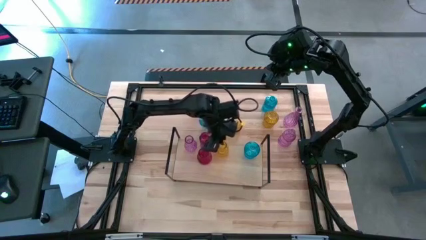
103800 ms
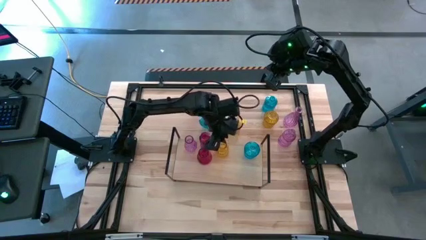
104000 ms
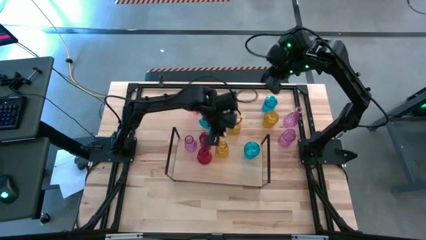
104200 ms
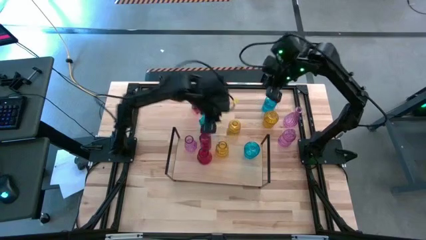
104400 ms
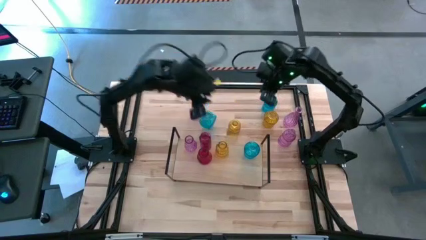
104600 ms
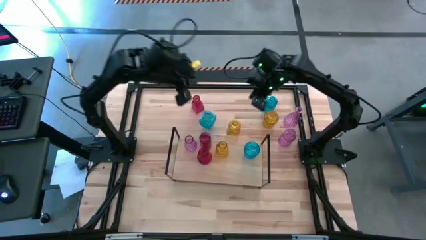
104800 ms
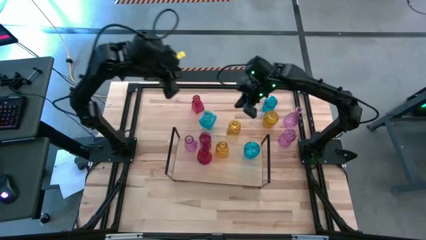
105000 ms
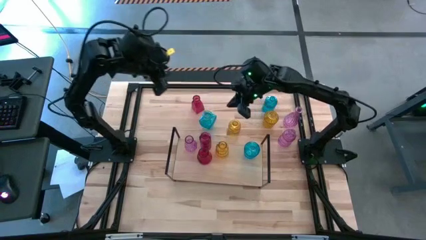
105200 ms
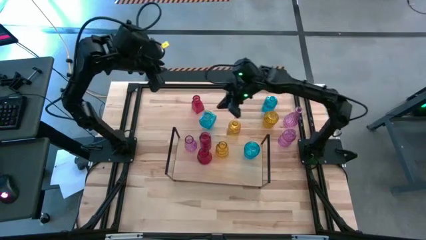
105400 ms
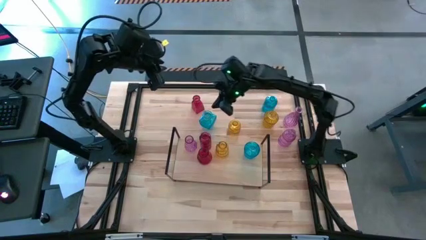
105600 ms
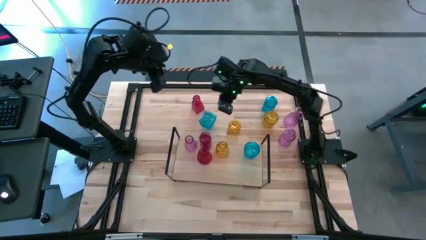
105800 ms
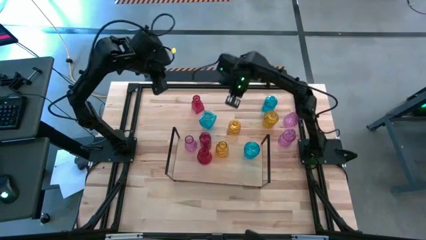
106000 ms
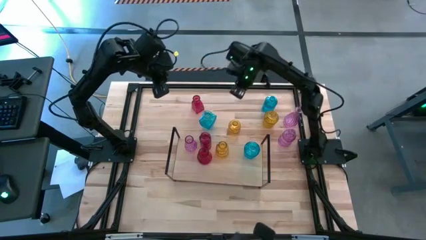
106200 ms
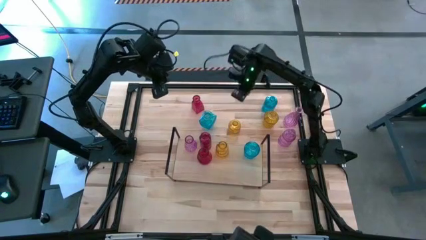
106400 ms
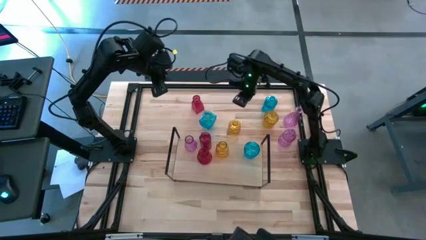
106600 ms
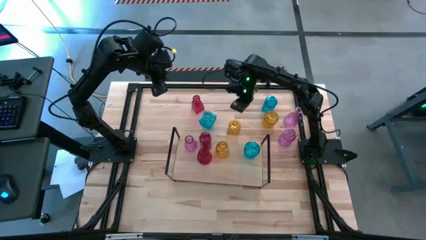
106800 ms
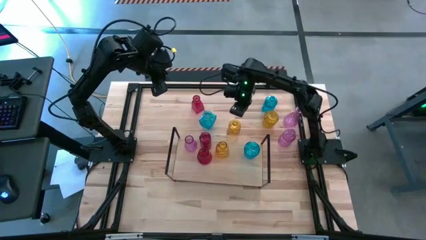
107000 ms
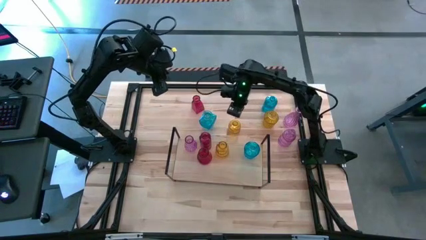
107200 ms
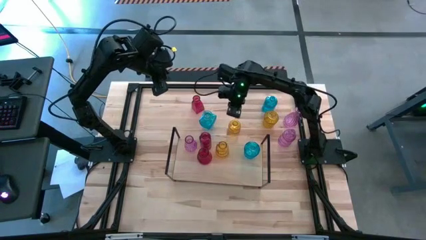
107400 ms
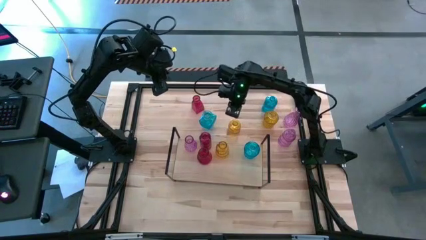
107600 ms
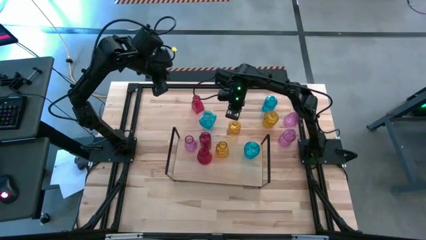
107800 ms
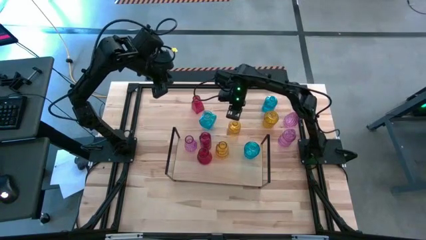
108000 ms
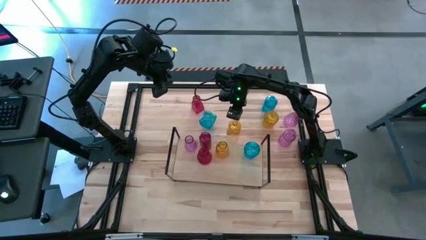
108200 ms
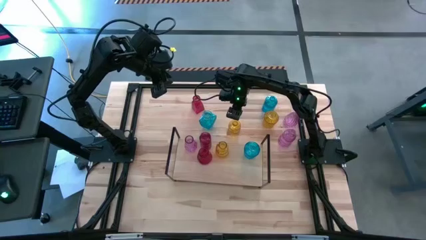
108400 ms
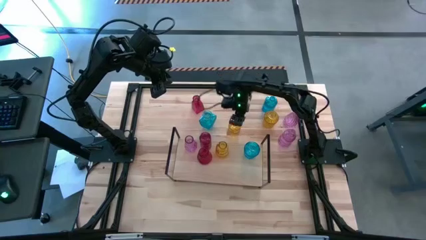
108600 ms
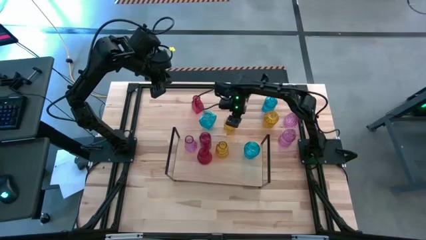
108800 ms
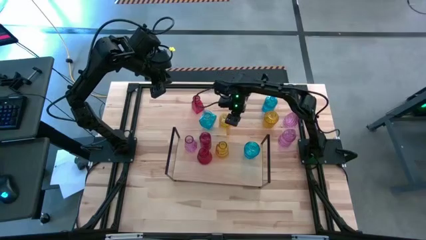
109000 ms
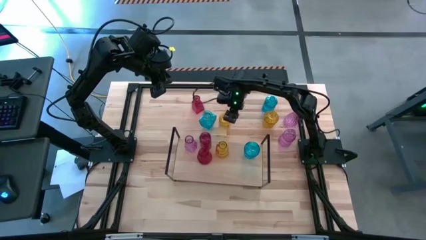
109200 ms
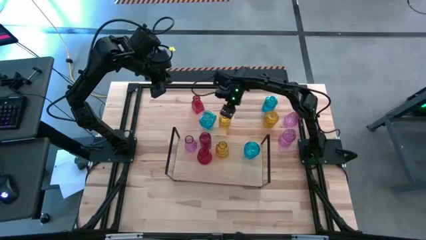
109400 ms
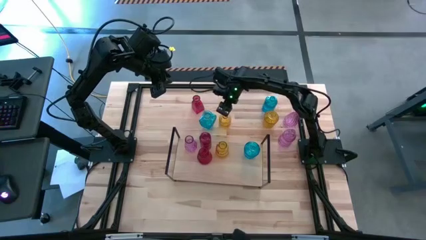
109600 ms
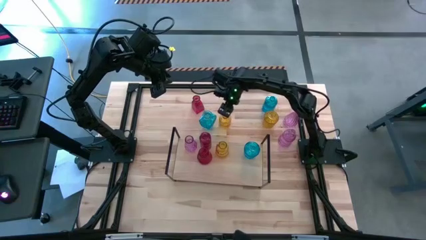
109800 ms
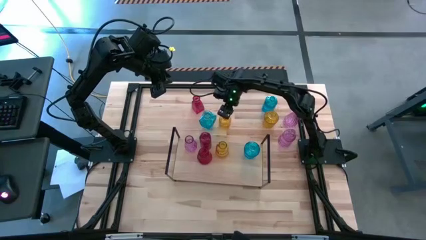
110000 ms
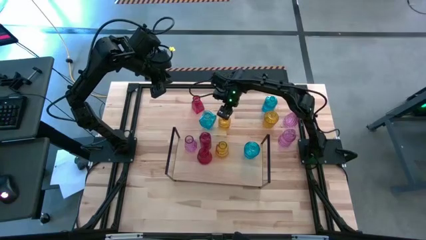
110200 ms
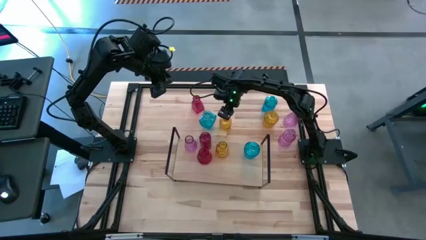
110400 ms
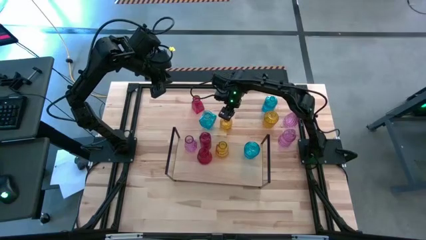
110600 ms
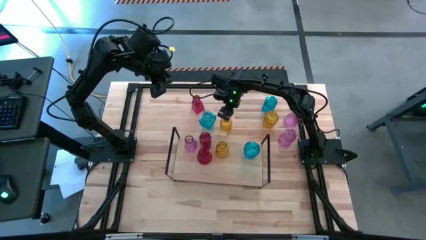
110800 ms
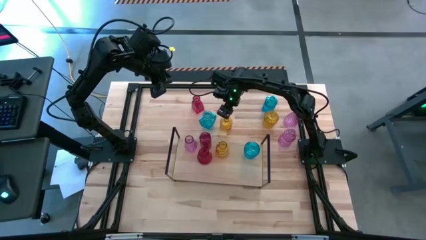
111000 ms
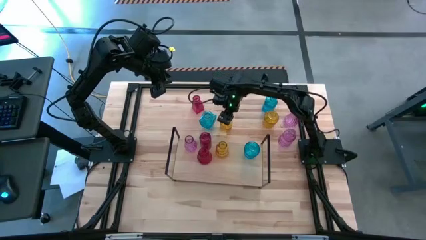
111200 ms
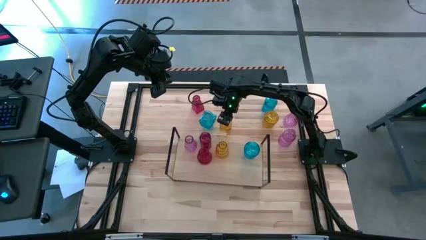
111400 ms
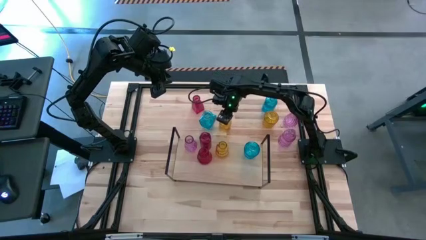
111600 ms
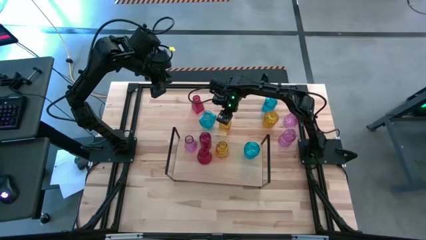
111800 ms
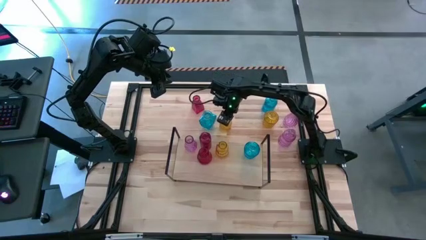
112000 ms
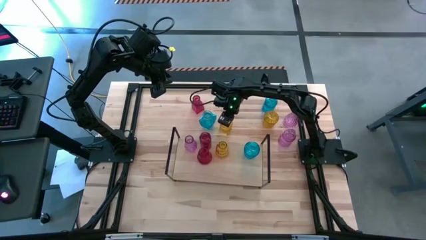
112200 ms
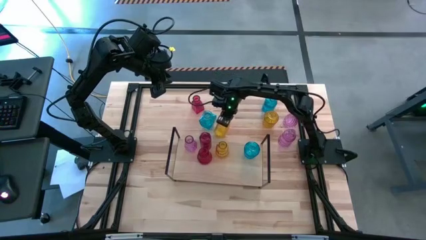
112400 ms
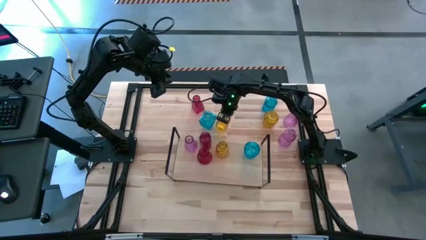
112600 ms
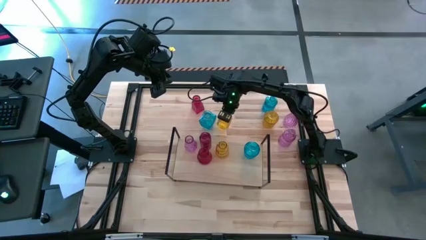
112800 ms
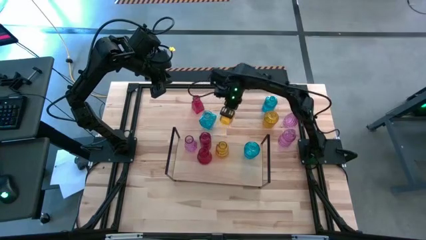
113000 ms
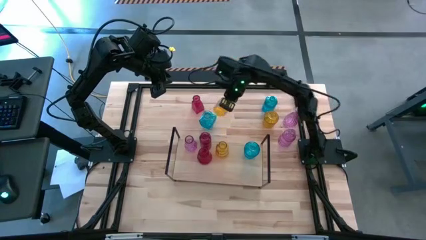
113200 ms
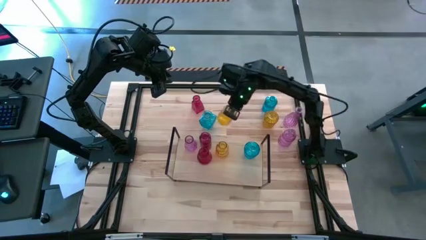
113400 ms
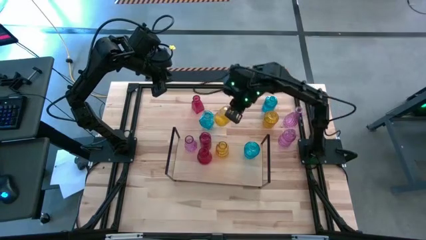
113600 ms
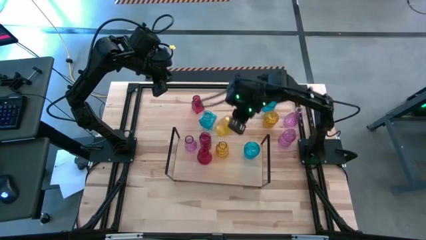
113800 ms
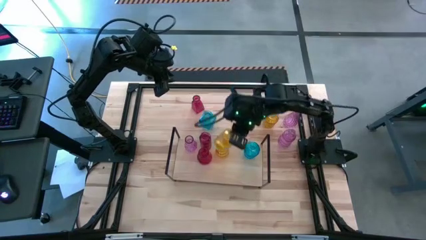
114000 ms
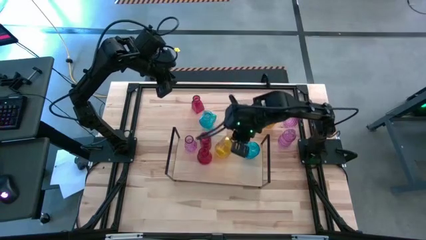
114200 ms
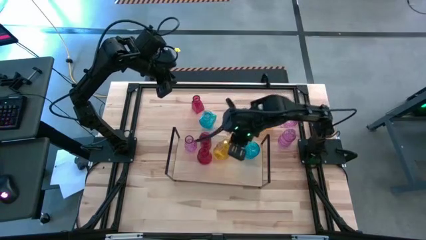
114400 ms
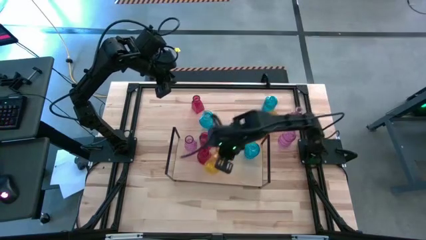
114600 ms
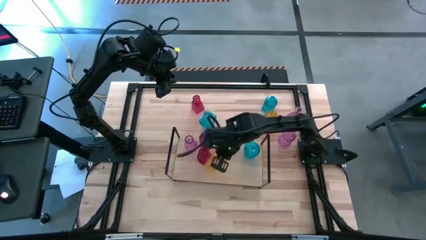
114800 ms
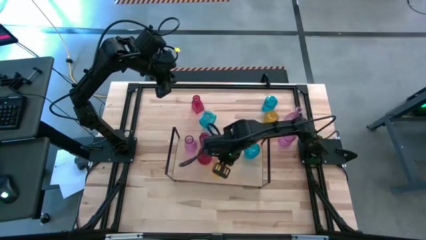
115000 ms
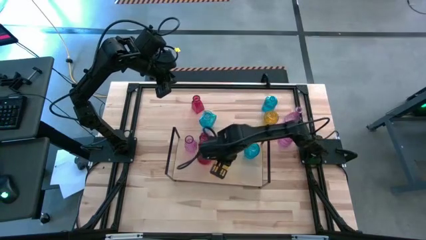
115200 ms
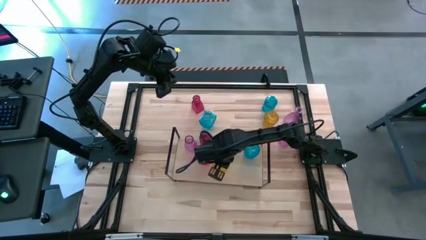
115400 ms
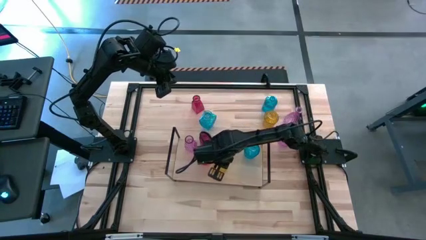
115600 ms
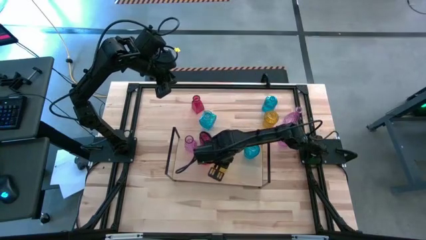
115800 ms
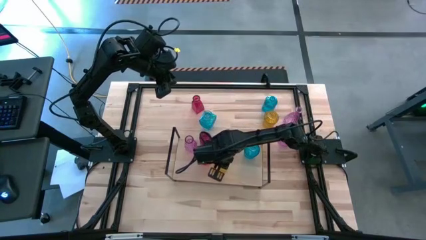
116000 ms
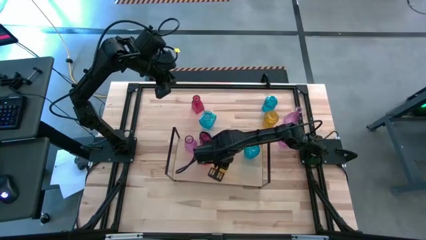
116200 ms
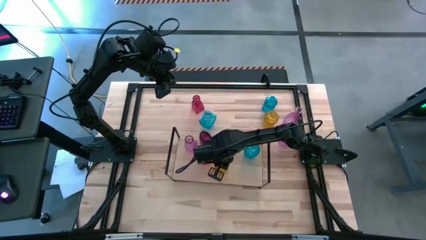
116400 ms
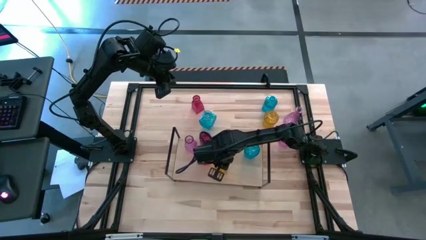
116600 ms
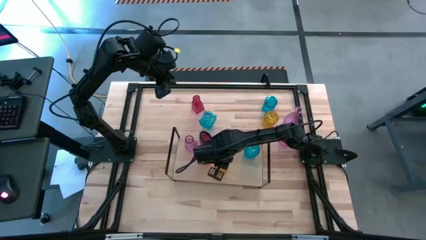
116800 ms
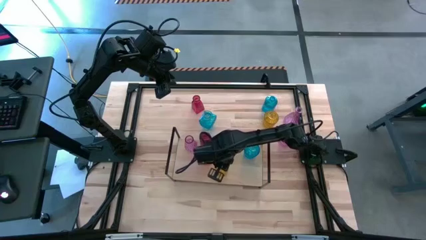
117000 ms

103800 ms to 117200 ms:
Task: sort vases onto shelf
Put the bottom yellow vase on the shelf aligned with the other yellow vase

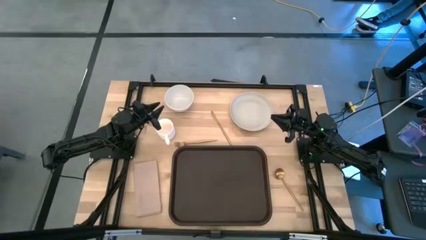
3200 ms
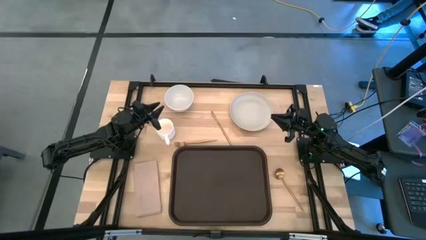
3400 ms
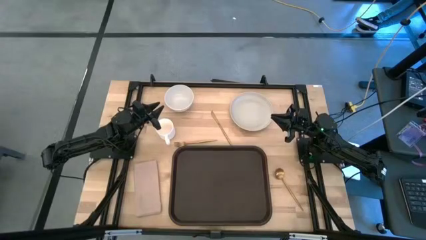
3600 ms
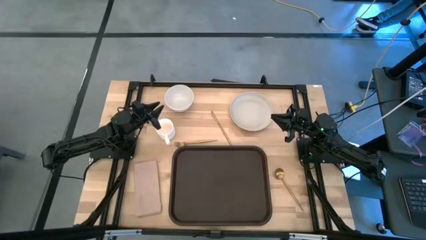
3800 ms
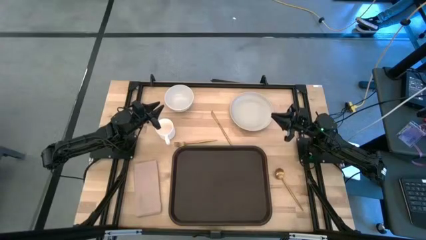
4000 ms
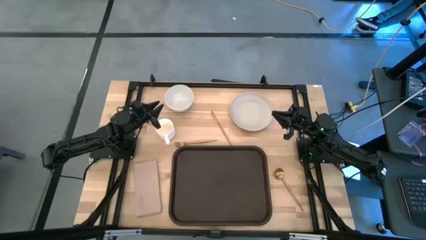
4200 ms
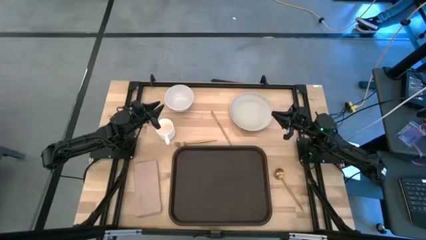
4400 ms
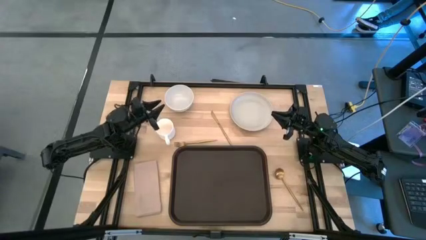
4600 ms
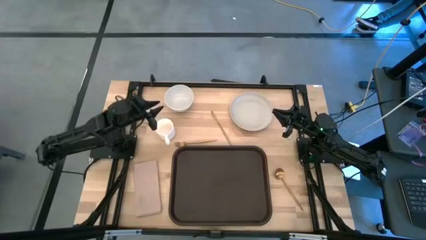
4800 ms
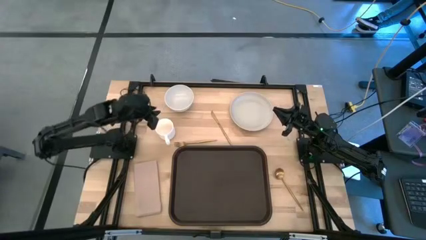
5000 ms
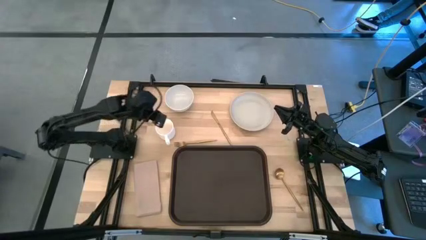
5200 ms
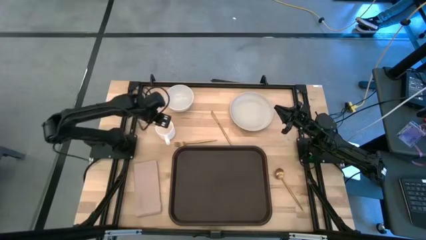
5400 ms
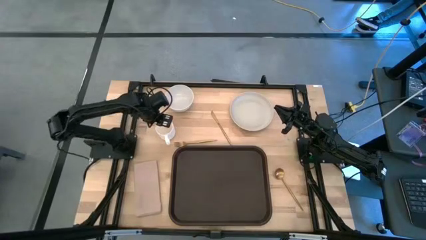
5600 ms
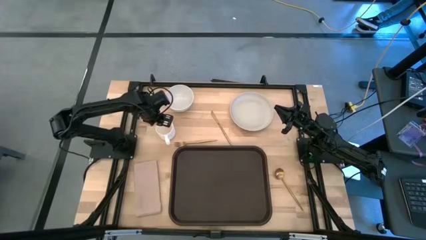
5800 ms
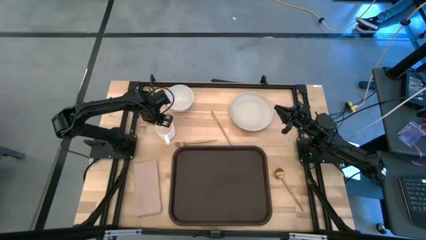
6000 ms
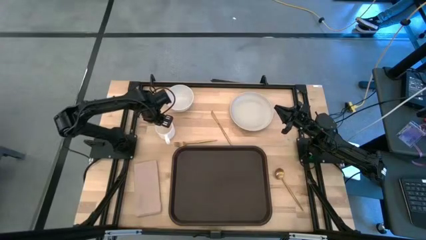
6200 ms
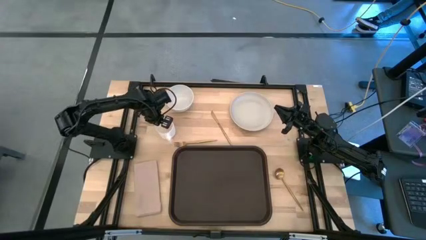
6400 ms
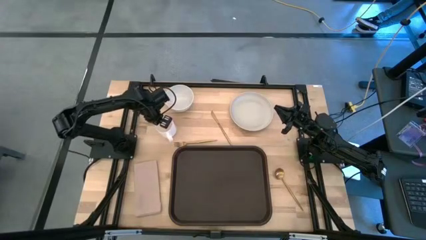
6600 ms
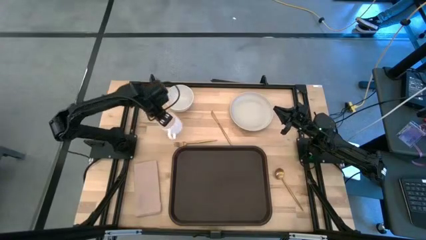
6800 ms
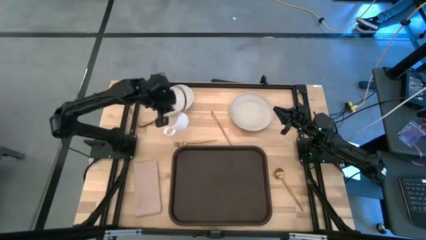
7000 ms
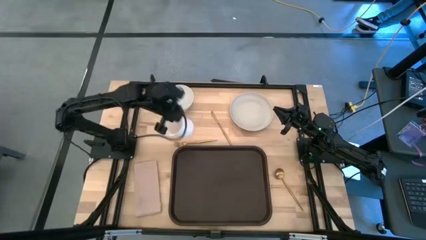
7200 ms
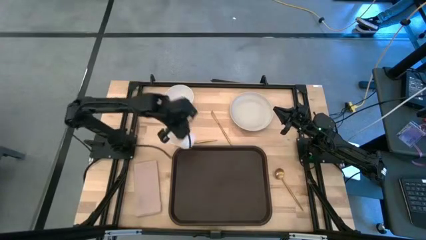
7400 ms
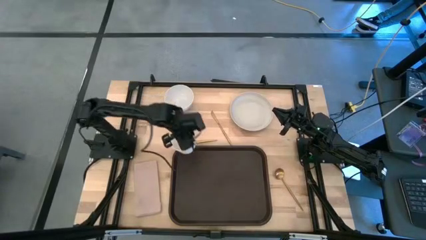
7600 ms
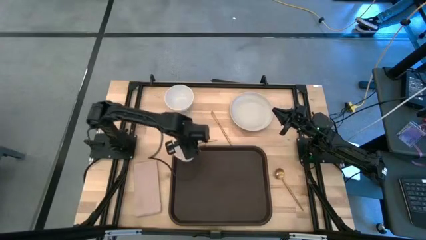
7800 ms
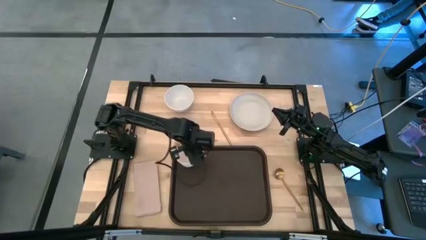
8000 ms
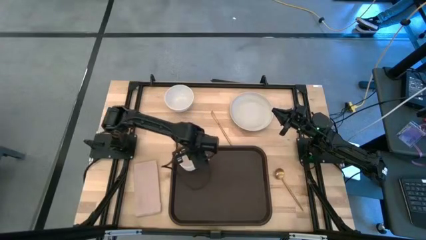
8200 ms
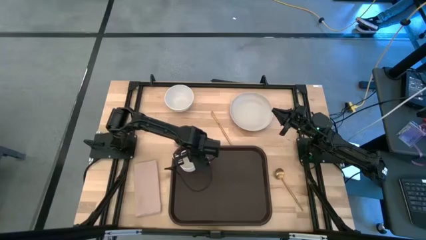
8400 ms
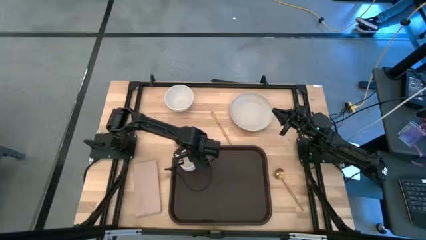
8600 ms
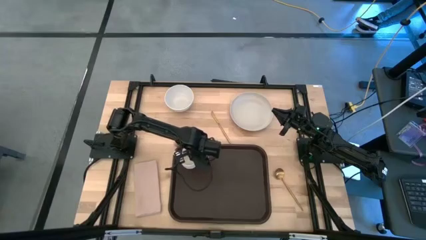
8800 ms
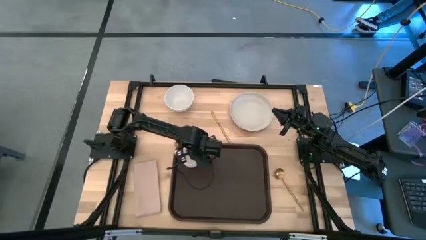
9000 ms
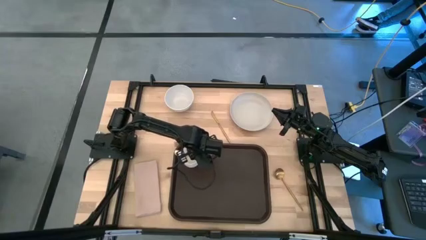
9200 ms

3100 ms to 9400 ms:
Task: Set up tray
Put the white mug on the black serving tray
